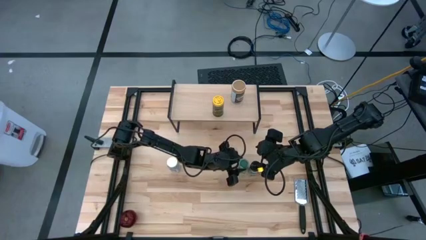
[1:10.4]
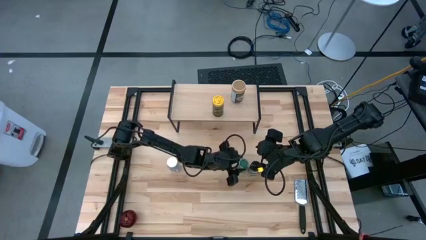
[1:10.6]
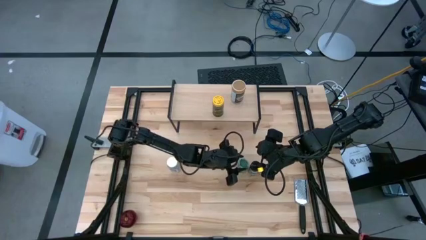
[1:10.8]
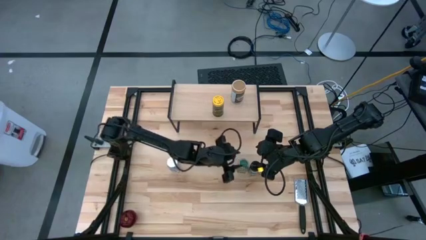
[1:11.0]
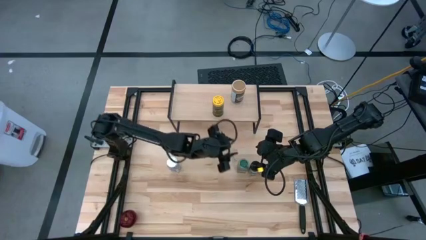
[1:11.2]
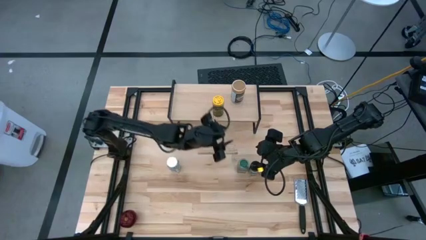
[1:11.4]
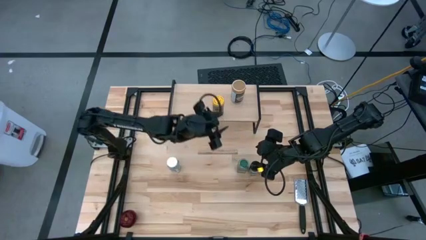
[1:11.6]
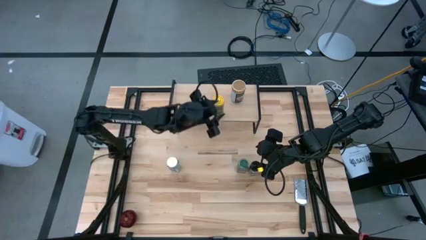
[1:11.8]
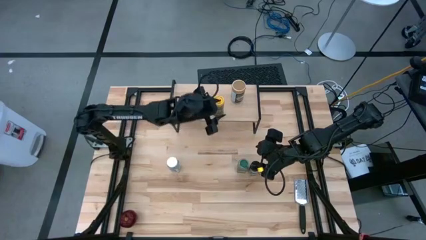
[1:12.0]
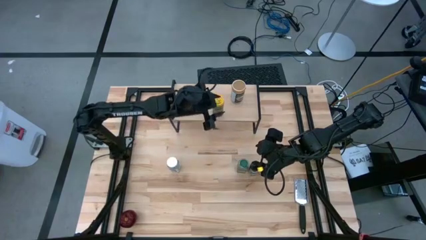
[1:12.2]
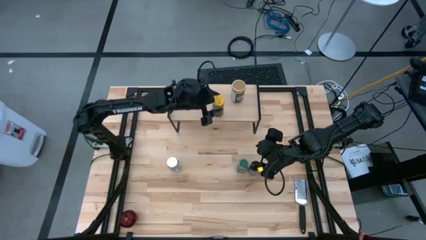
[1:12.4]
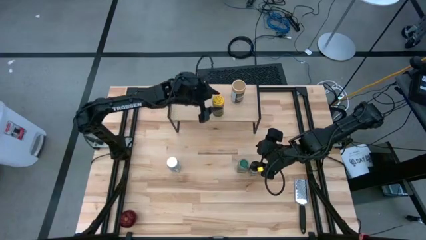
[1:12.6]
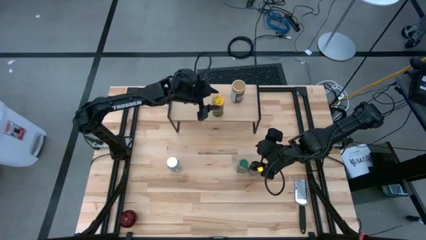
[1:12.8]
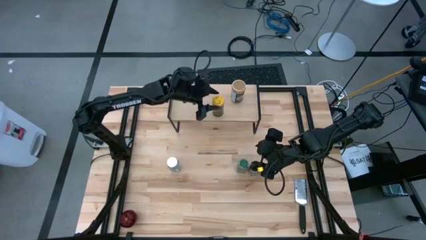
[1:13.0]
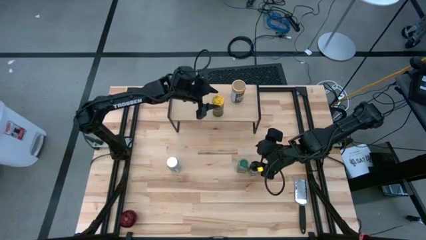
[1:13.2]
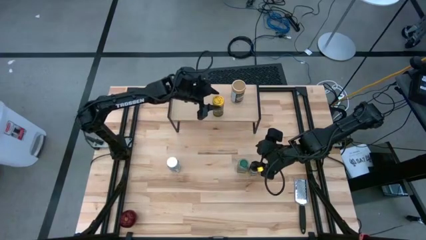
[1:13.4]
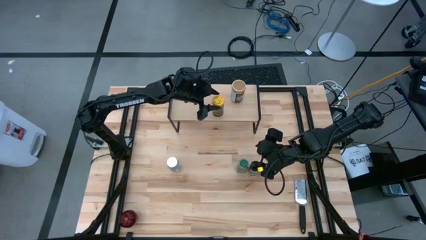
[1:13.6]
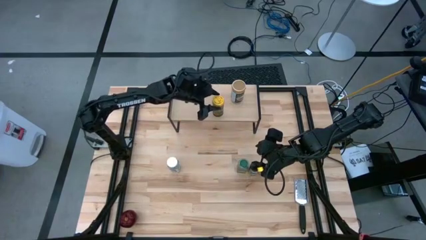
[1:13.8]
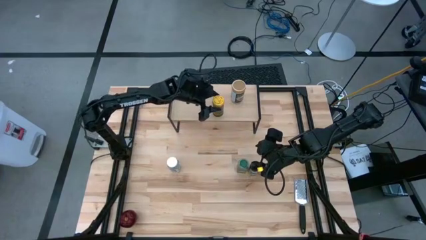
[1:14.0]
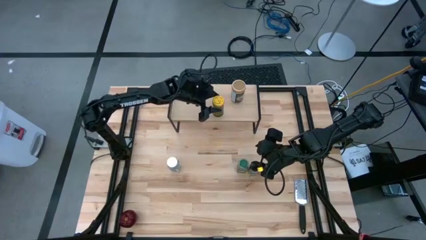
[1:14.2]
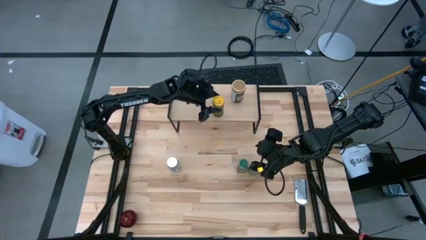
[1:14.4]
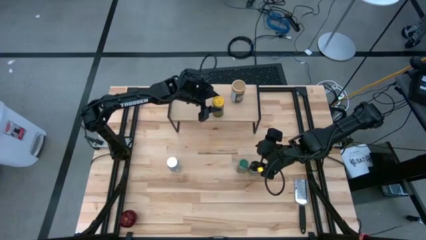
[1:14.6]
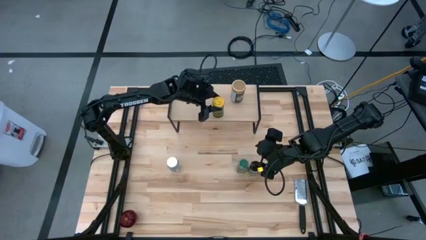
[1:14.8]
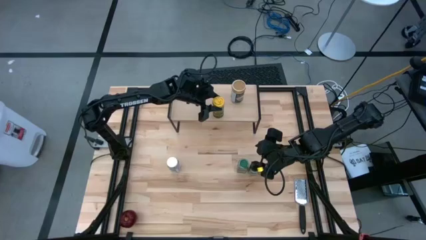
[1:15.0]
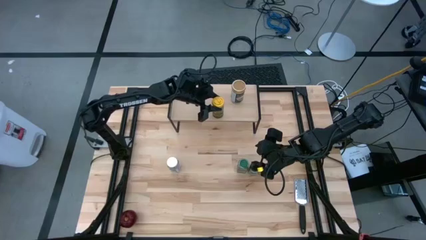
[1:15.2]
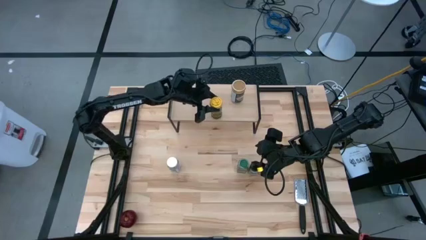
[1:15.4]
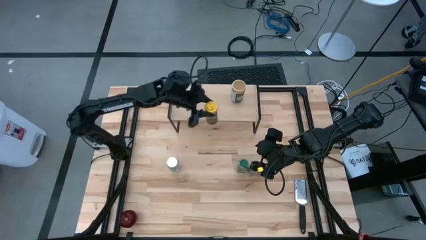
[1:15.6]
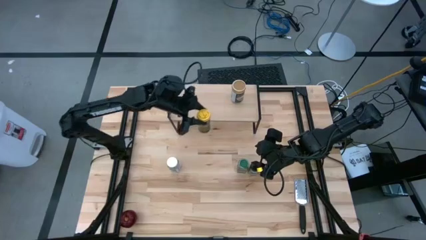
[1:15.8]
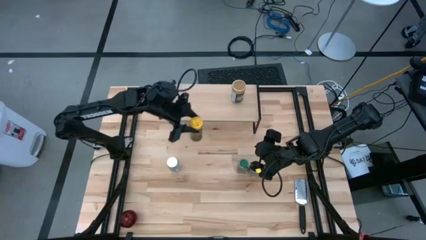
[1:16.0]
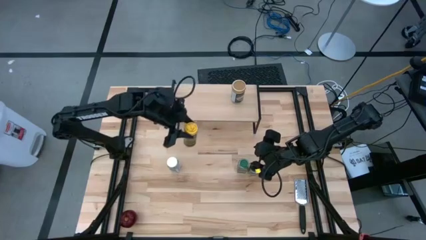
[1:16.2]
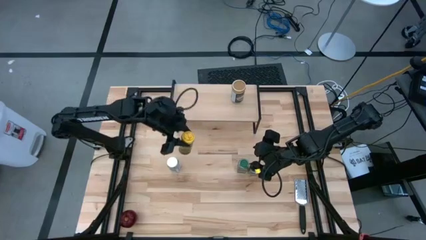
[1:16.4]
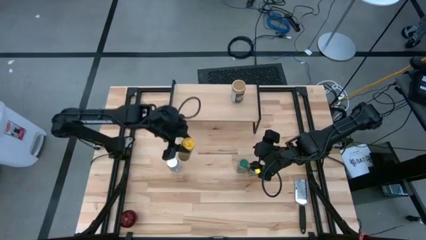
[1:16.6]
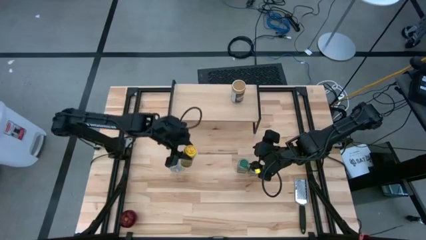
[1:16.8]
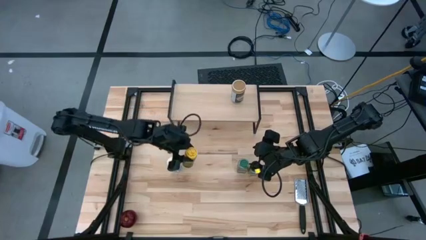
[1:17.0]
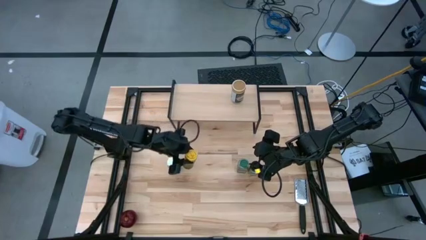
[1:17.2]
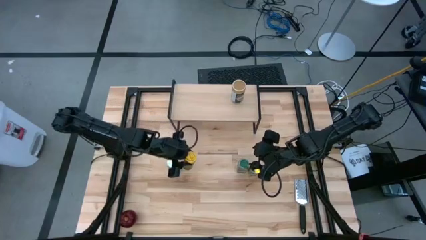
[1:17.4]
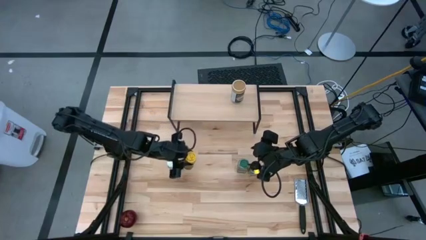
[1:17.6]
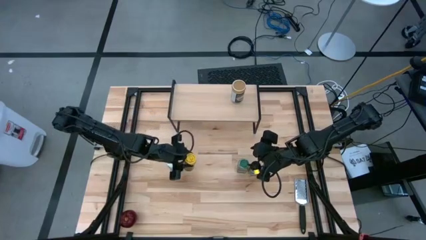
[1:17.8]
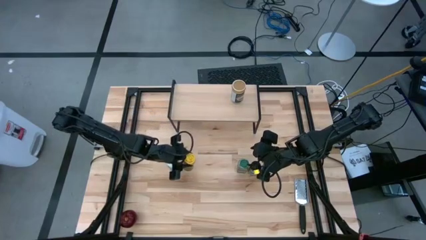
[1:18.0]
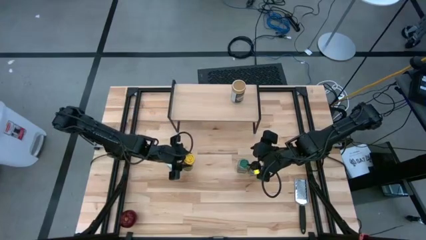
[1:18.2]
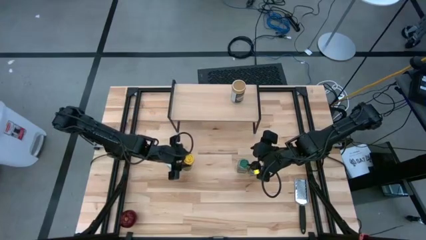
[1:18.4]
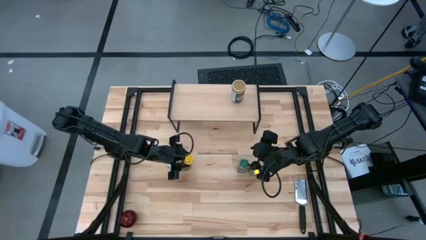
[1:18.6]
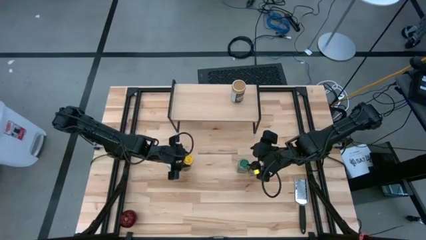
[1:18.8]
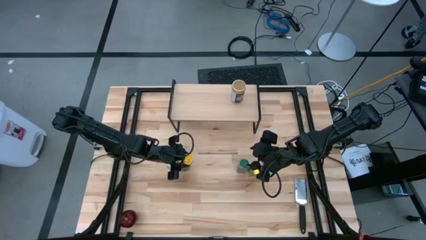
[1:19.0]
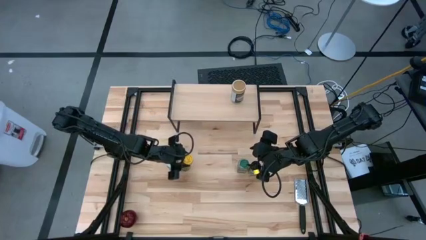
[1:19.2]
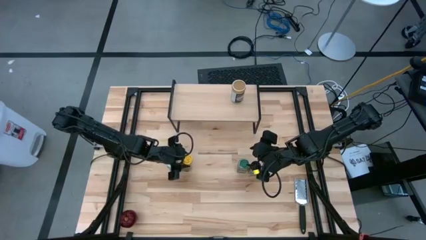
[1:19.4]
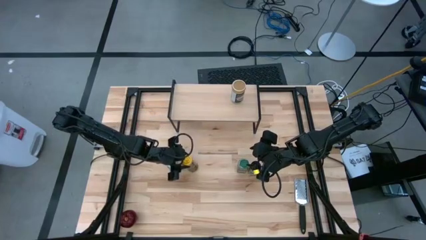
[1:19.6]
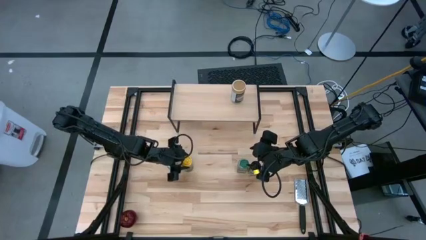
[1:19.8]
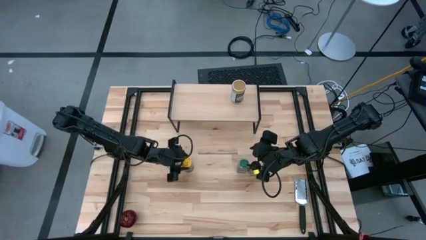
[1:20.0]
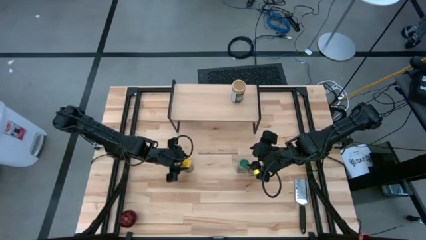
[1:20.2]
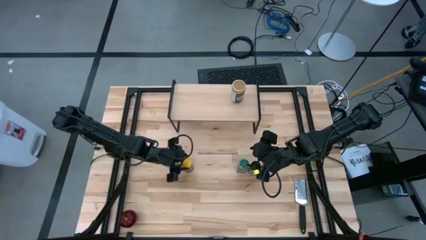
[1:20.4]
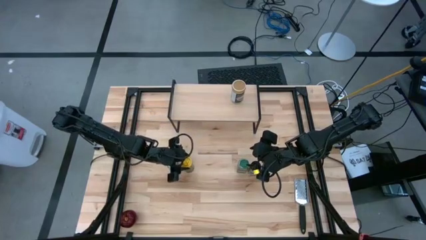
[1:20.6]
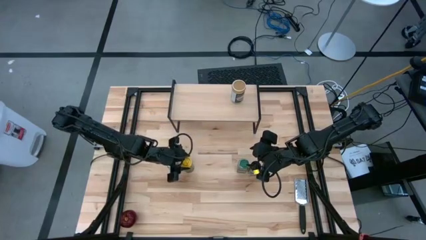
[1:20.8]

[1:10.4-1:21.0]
Task: Shelf spices
Remove the yellow seasoning bottle from the shelf
